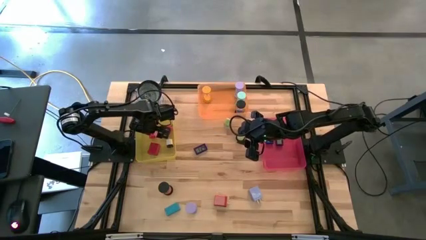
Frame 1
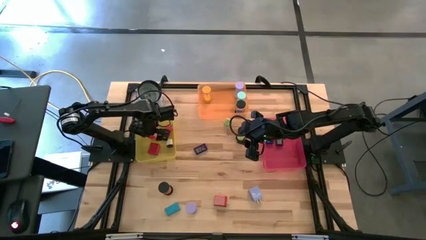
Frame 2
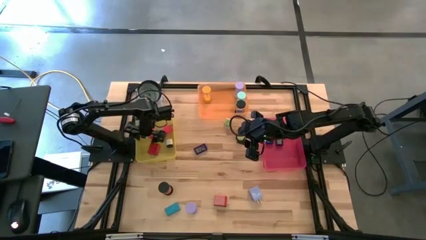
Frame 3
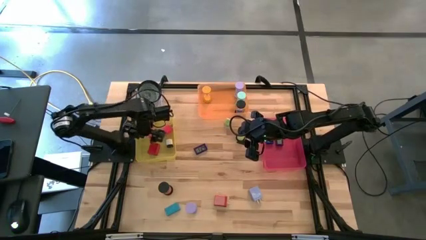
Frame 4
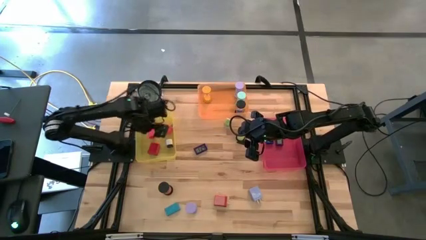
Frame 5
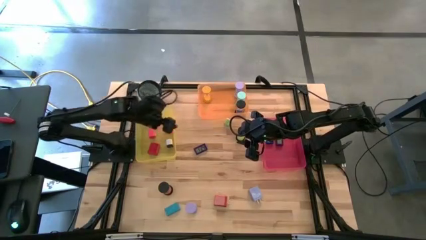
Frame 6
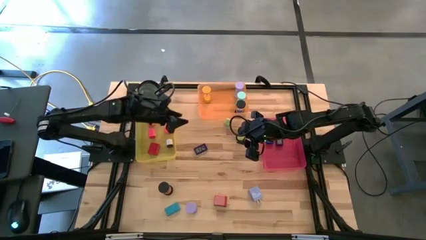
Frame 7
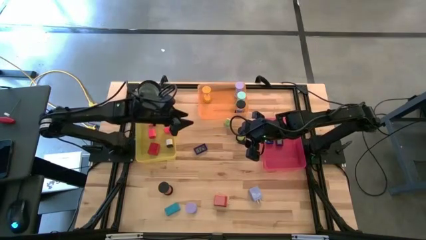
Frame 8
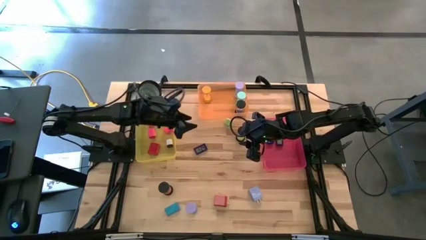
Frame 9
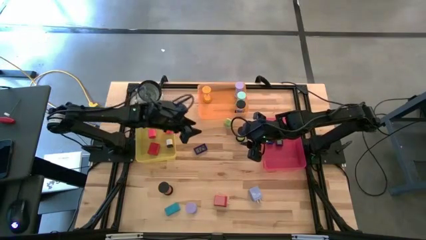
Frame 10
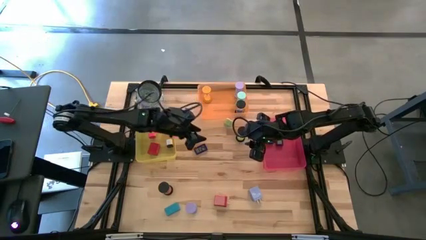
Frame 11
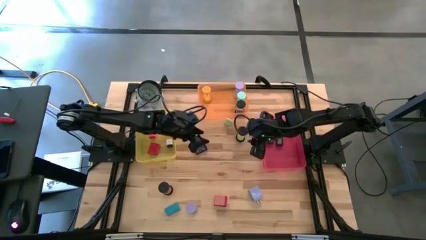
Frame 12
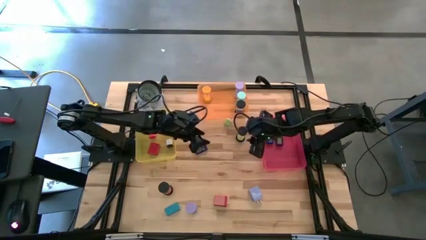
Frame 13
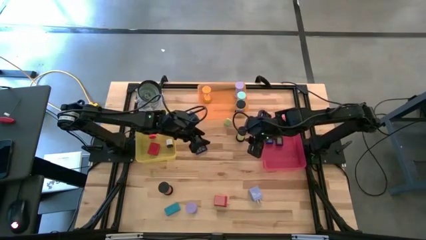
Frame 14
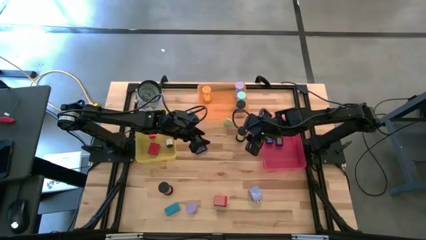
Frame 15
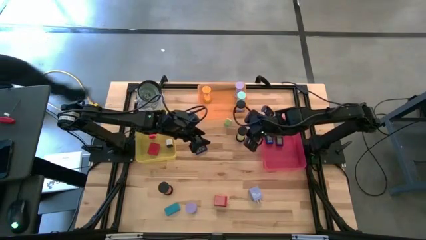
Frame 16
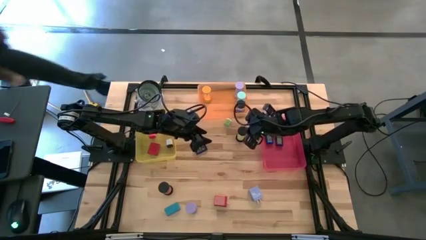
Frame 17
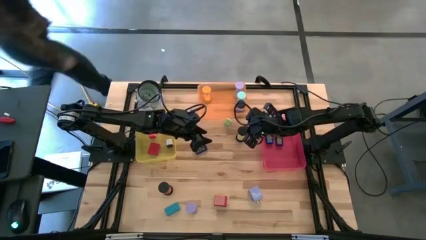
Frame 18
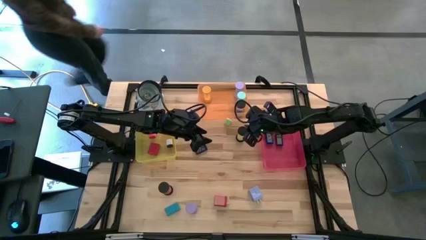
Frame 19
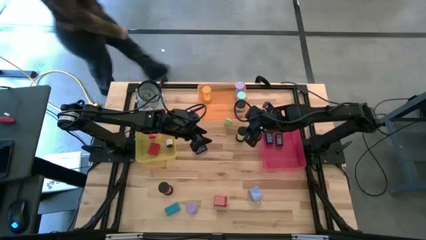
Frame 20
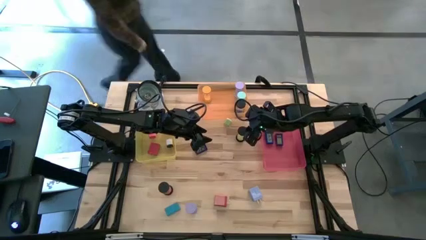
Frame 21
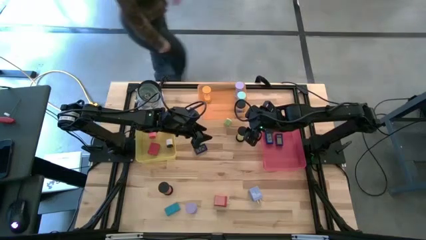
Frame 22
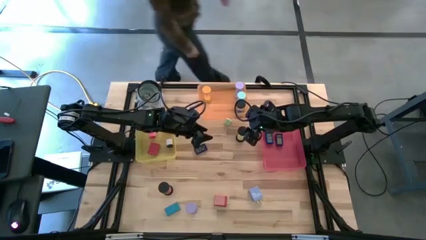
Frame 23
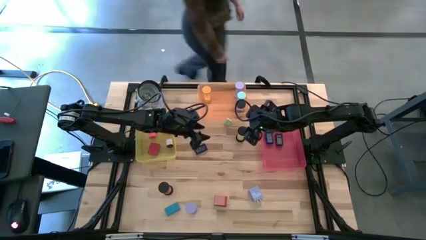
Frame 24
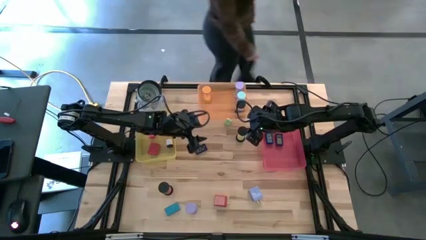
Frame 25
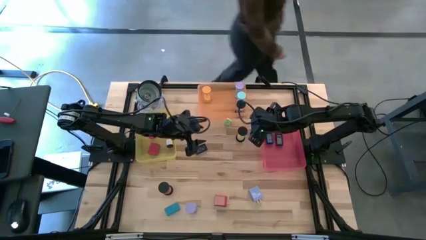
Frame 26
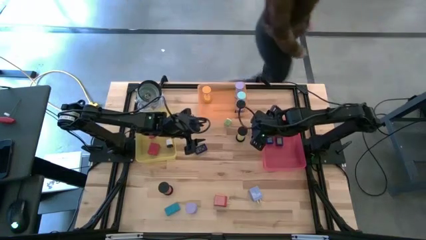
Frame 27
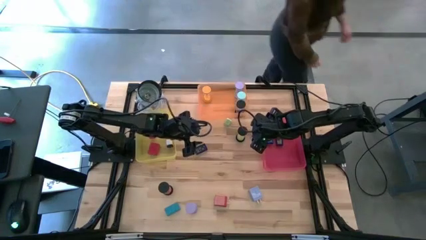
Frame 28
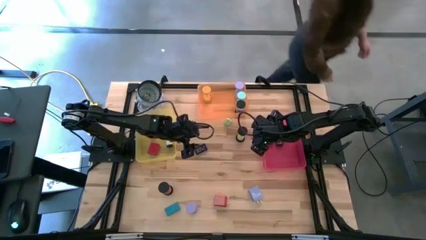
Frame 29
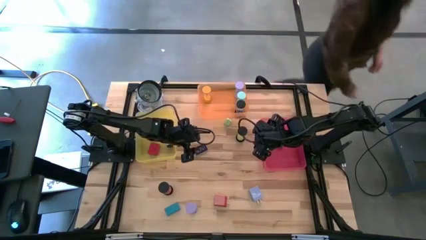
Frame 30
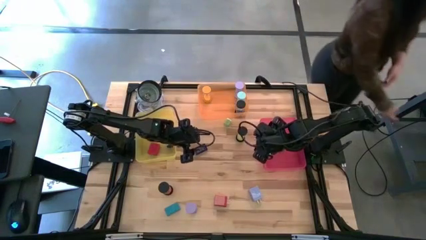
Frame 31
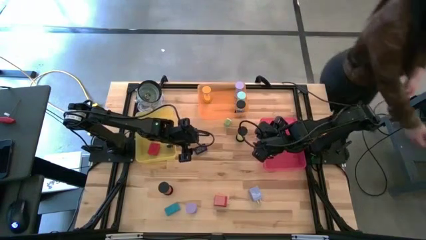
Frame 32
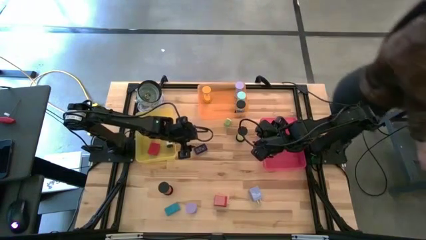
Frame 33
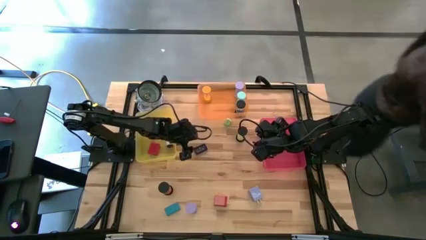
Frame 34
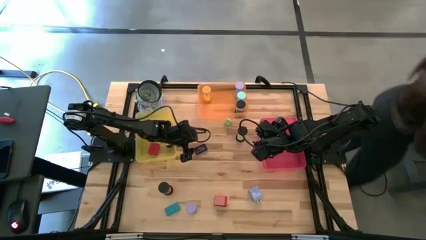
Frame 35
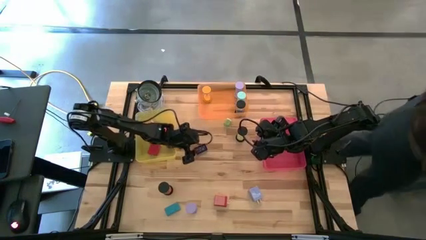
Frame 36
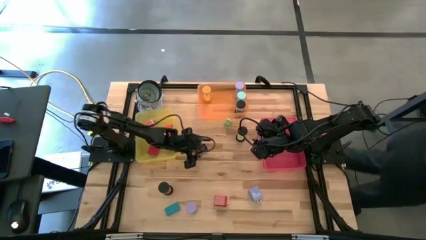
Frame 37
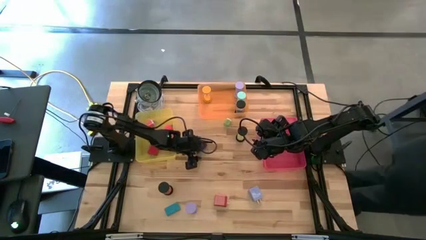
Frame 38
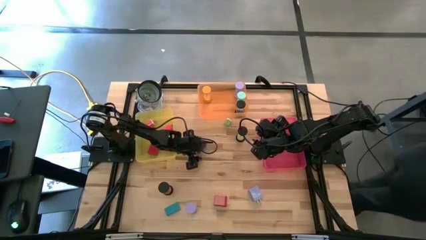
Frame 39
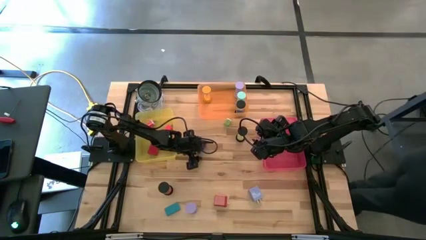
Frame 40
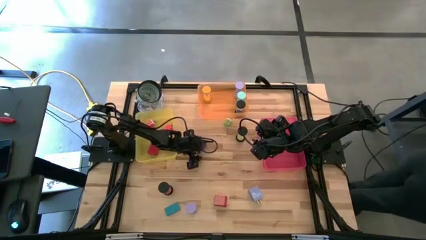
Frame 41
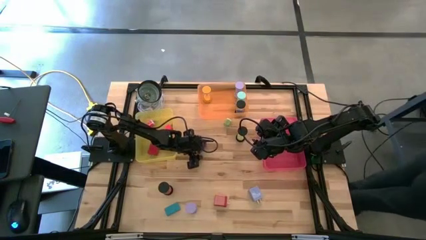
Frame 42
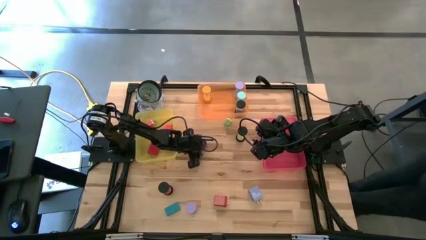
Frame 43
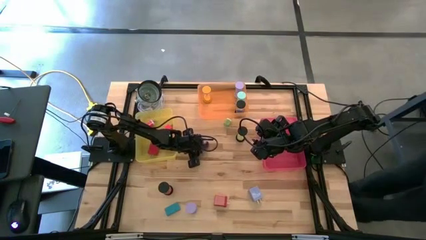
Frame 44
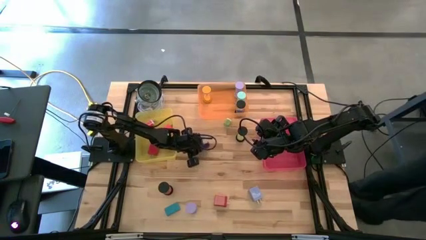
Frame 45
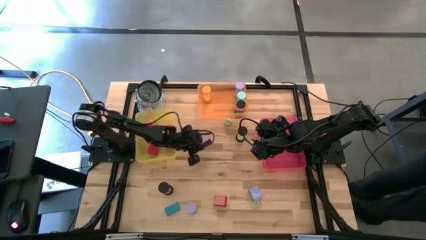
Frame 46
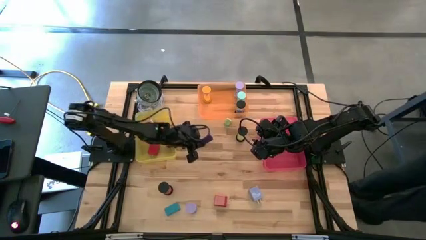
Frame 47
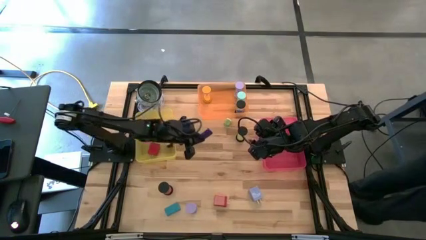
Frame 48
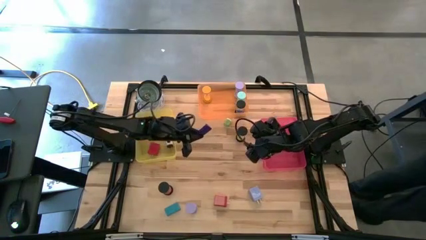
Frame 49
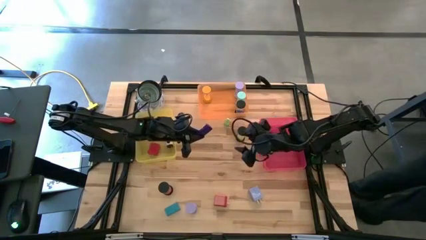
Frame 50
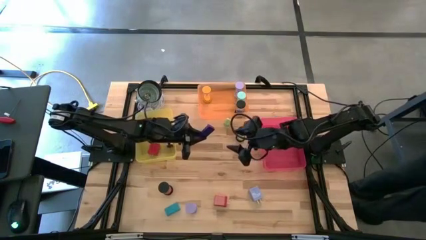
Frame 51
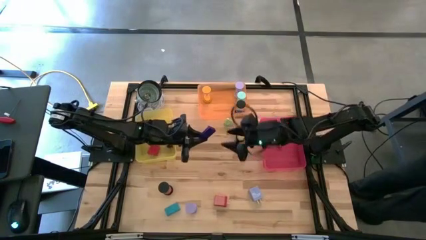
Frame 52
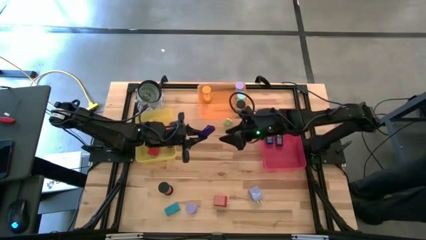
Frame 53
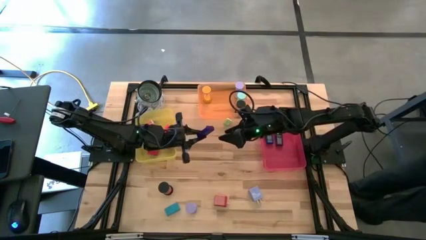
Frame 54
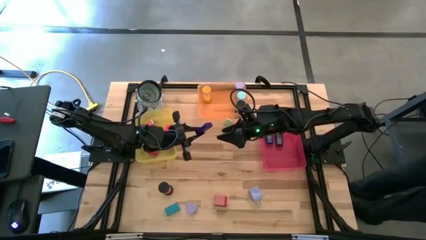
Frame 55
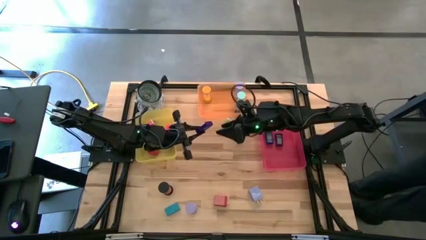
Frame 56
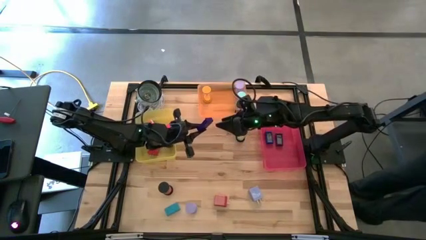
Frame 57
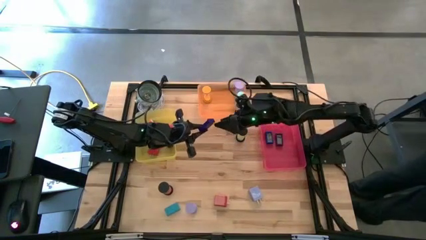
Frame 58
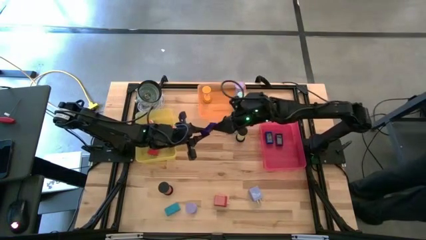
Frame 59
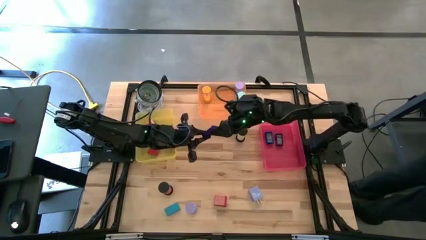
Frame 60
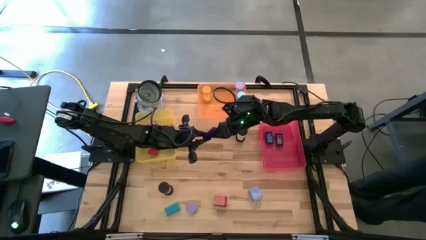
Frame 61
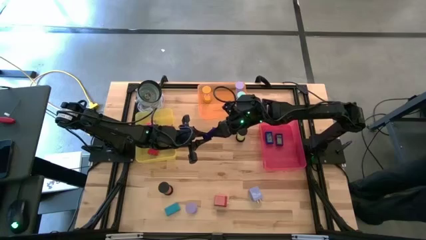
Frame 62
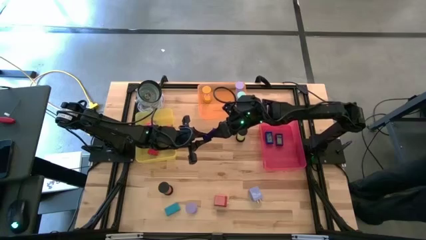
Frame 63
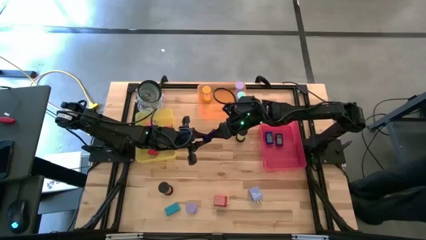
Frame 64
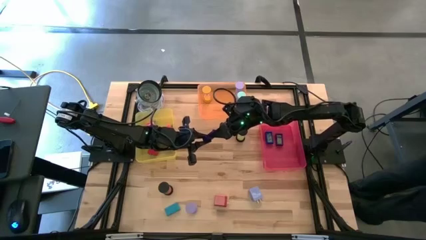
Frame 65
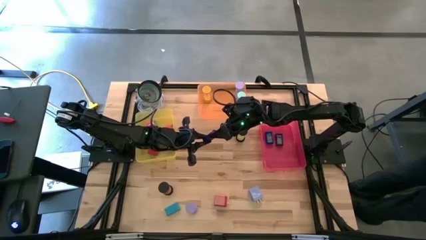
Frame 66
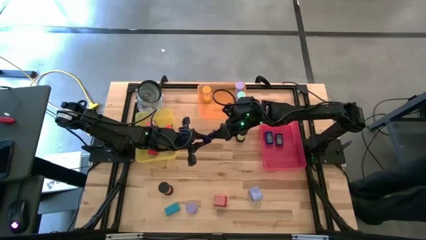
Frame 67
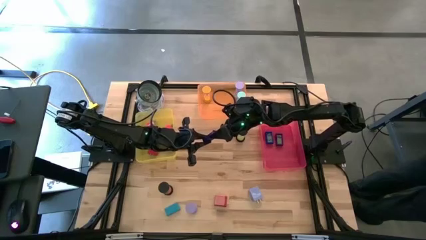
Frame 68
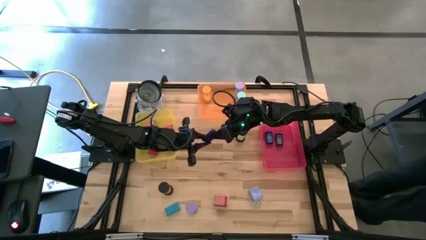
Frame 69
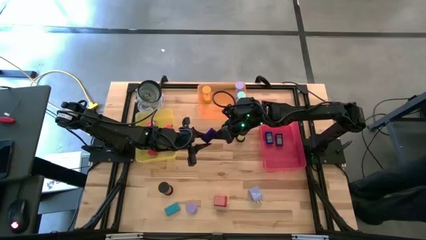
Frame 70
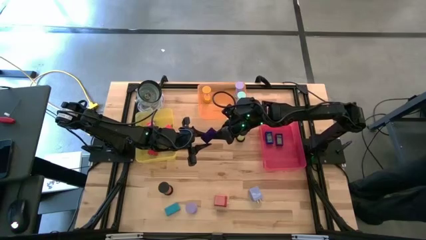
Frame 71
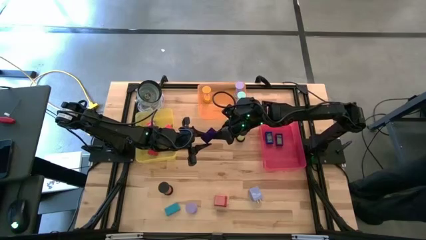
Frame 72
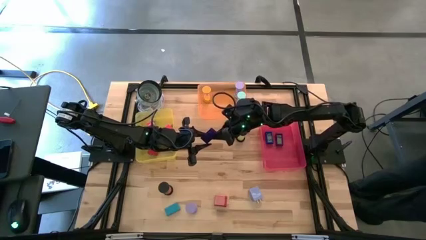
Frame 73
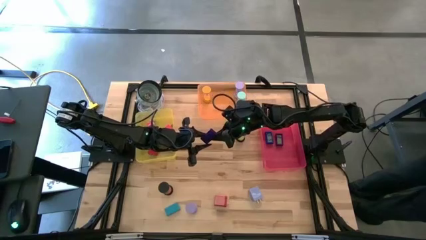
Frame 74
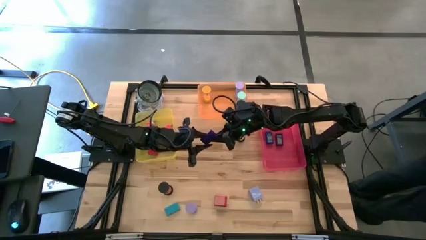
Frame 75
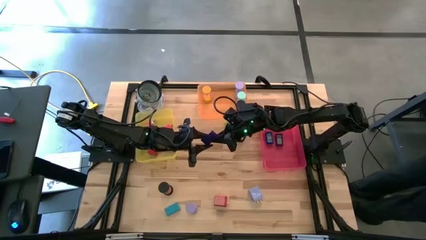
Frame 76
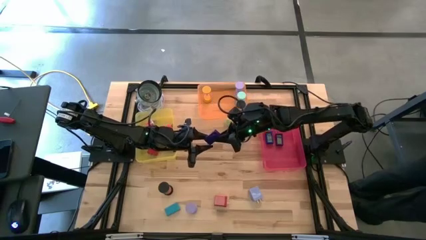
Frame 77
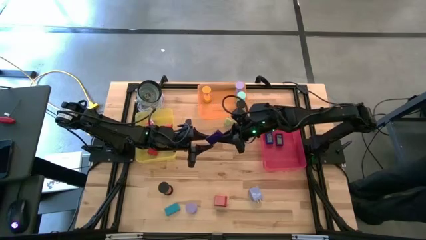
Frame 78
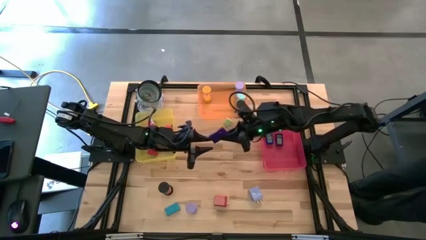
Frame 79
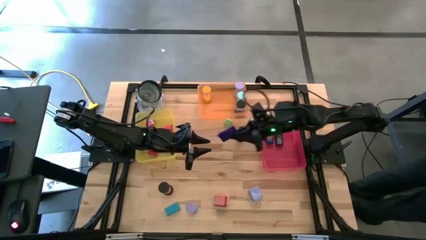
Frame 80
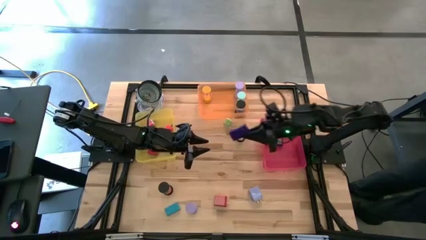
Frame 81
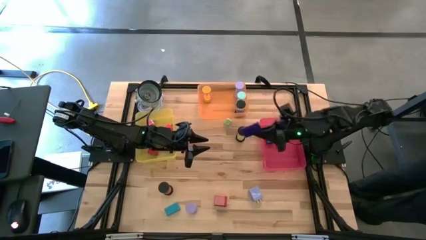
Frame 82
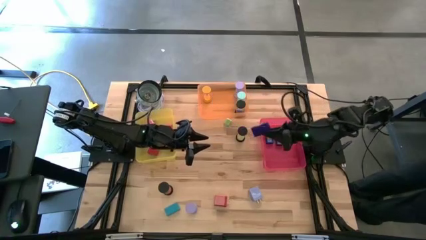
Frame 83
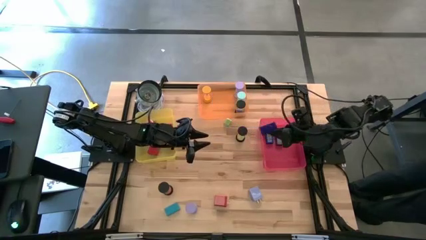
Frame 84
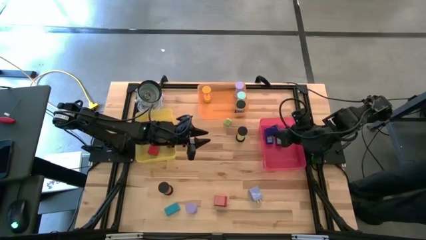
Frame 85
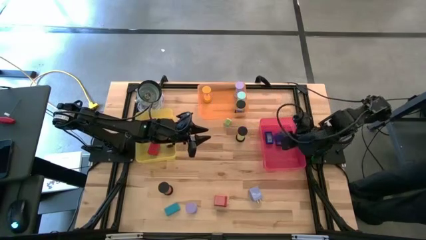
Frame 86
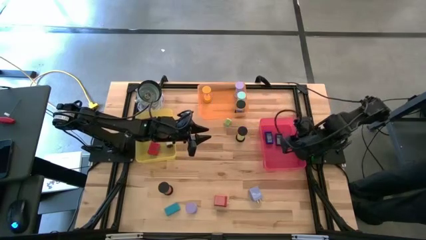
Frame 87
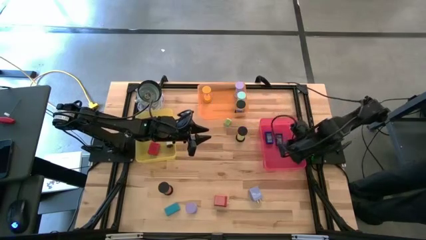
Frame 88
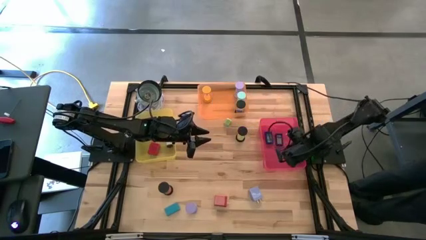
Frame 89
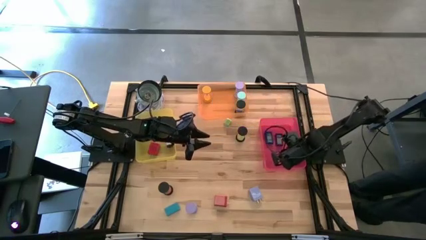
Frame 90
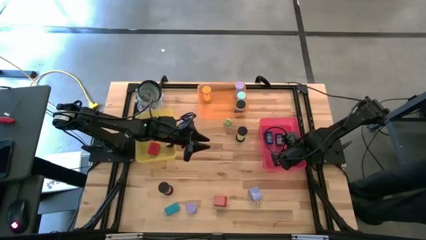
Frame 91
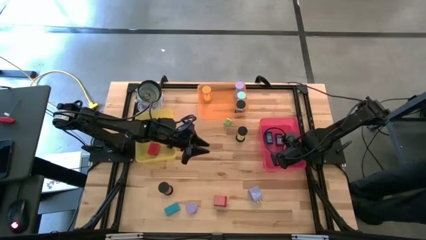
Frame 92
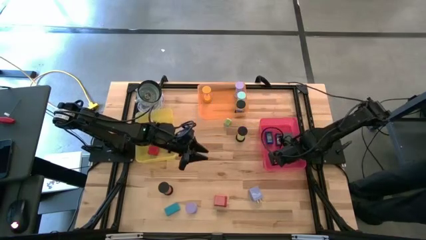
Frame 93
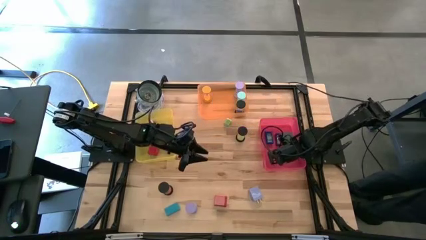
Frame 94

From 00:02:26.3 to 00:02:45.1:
Task: Pick & Place Office items
Put the blue clock in the red bin
